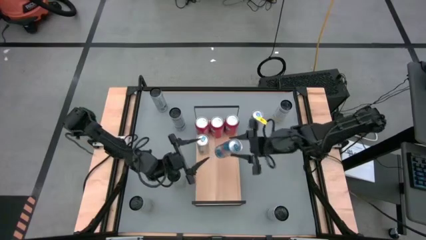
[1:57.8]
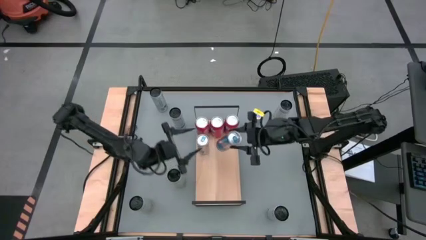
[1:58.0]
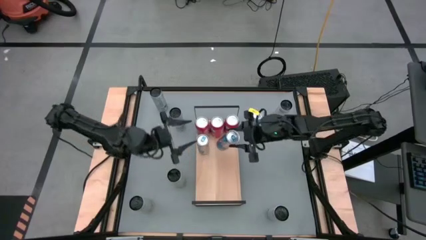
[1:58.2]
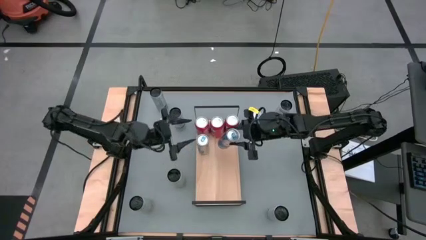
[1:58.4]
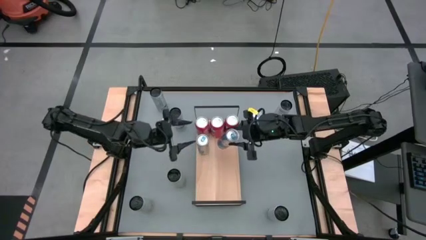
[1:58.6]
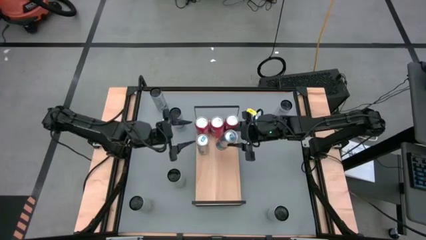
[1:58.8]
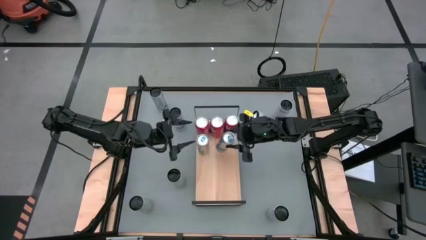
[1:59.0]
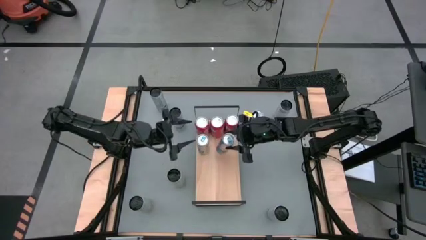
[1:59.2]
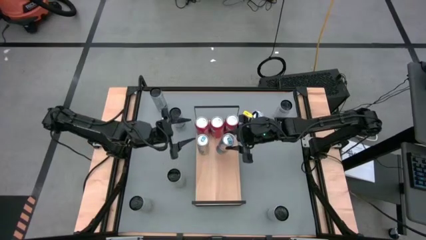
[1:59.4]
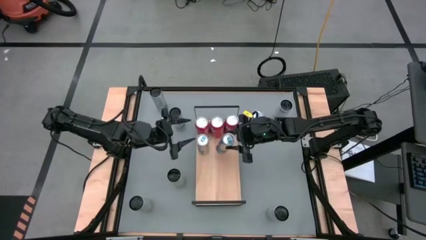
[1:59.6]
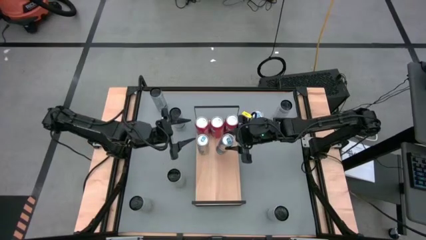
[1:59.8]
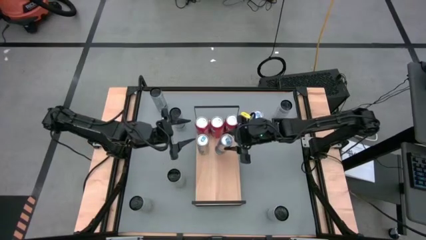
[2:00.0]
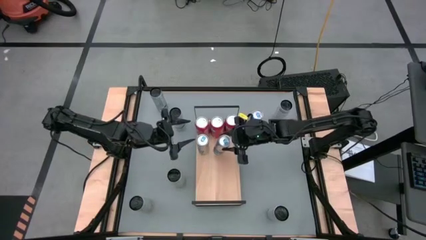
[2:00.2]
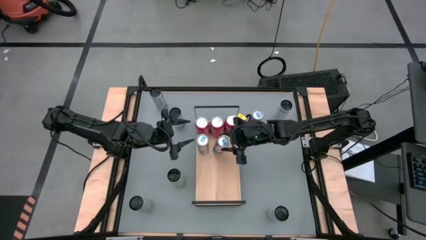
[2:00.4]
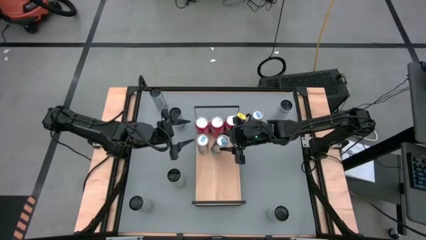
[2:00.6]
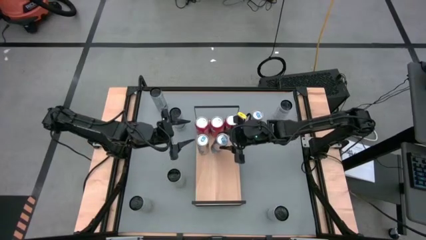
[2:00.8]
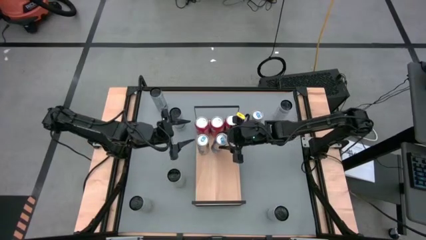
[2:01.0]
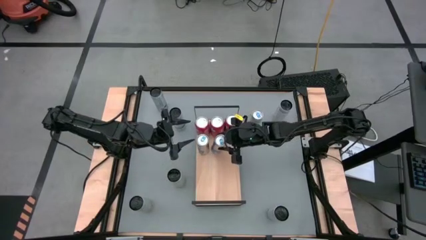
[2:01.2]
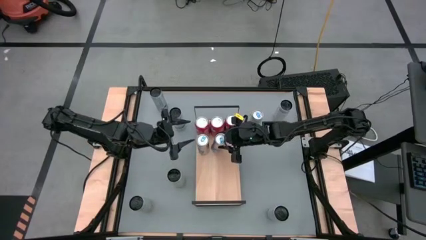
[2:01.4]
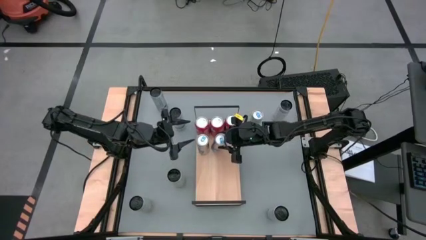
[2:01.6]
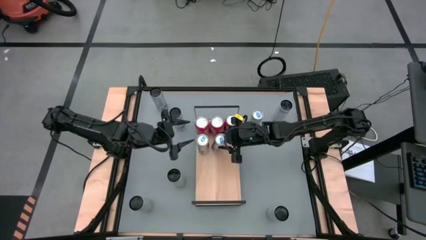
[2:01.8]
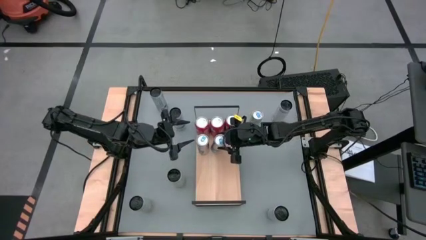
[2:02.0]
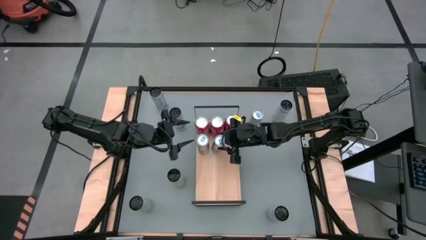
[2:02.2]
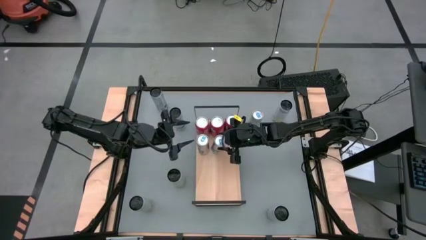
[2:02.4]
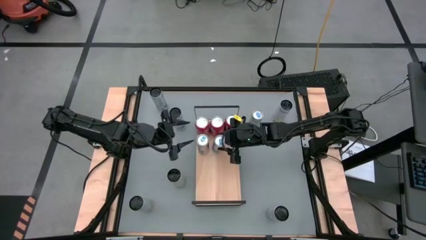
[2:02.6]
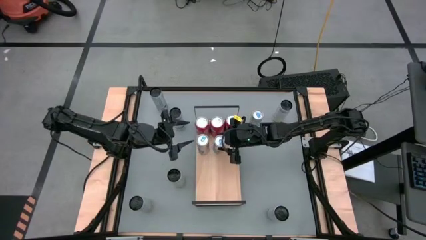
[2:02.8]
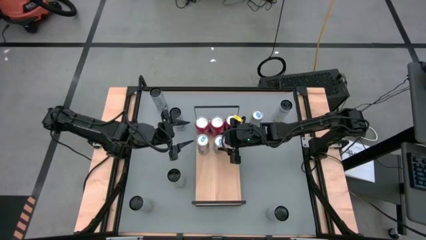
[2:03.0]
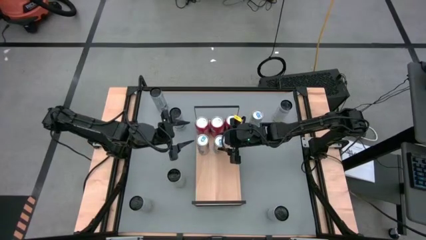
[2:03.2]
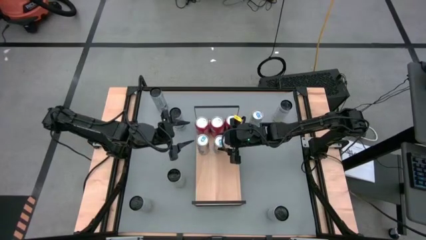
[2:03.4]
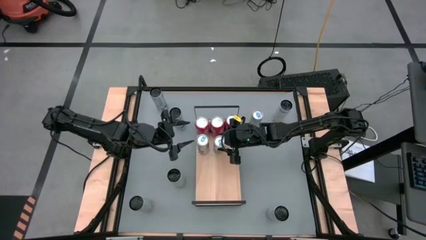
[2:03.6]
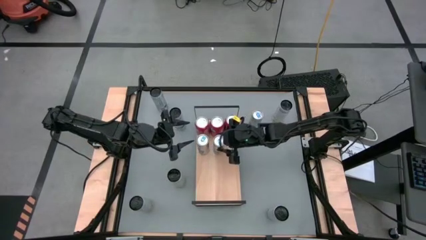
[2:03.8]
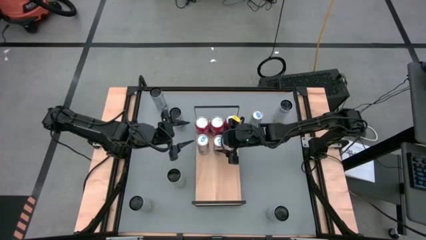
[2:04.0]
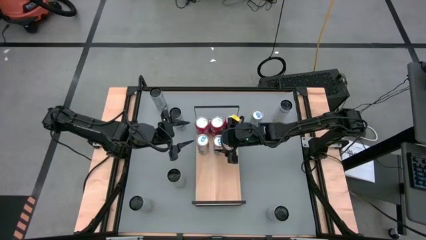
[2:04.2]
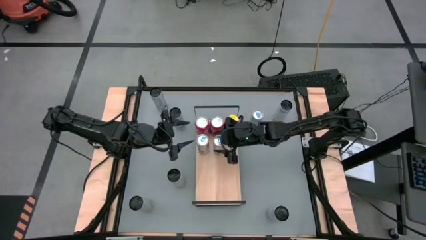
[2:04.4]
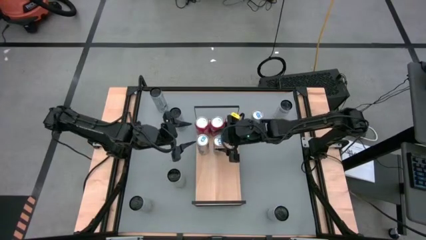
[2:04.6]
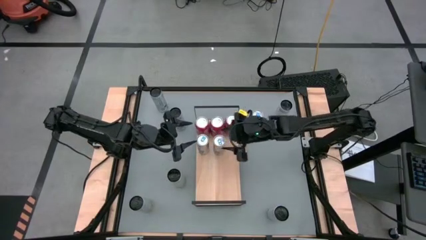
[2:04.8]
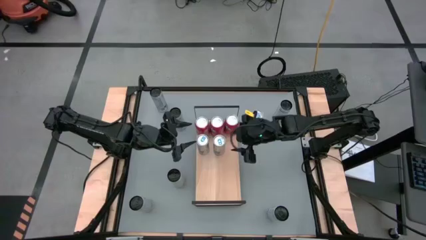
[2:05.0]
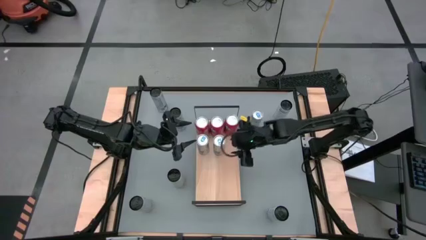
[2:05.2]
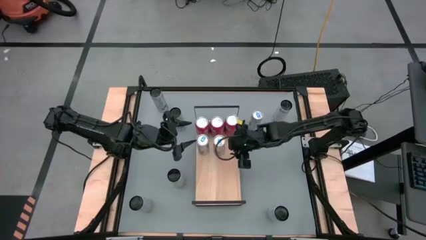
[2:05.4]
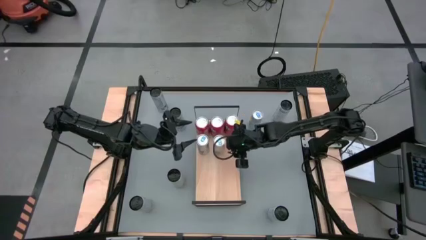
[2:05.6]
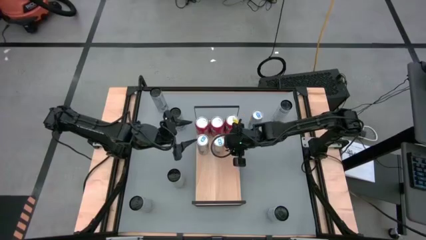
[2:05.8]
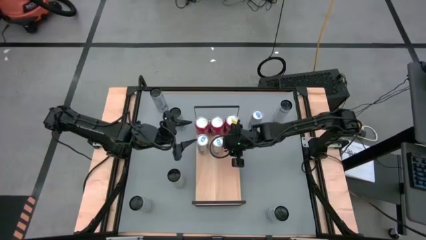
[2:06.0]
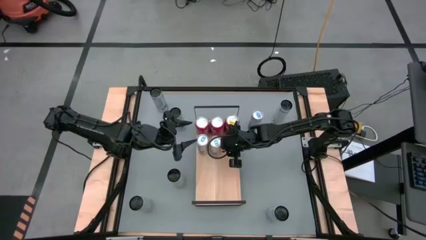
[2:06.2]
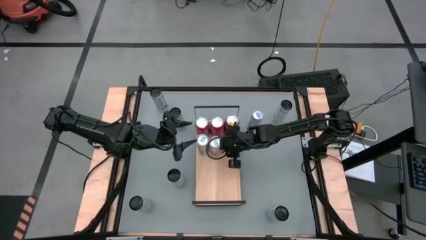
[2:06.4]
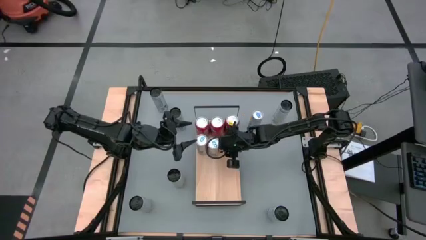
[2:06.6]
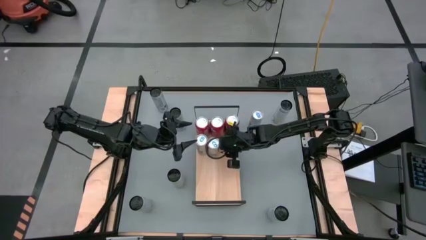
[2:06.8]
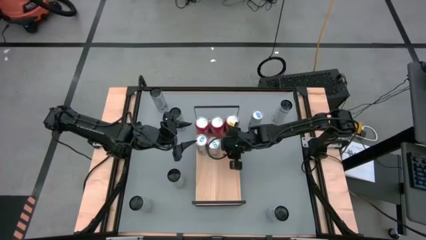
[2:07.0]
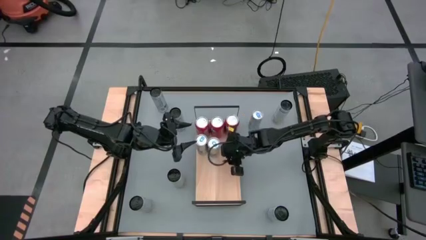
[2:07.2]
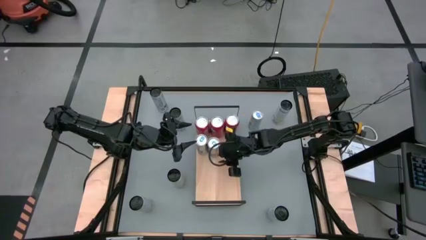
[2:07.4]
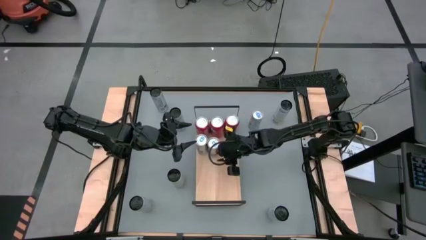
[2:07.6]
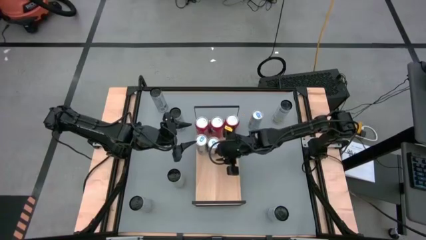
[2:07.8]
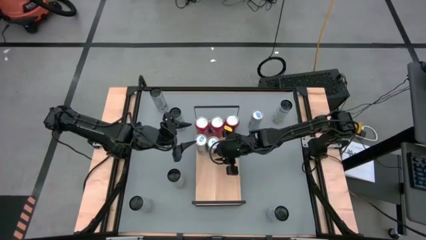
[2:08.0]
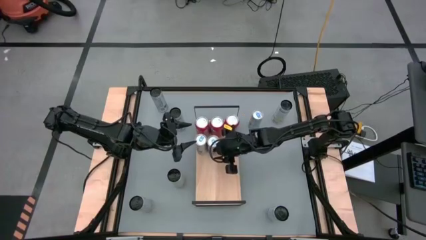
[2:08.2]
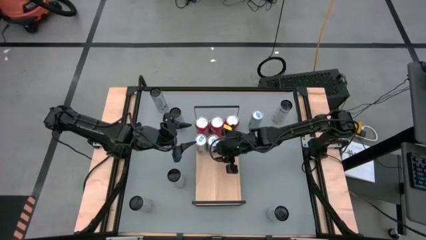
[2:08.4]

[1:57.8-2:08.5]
Task: Place canned beverage on shelf
Put the bottom blue soda can aligned with the other blue soda can on the shelf
